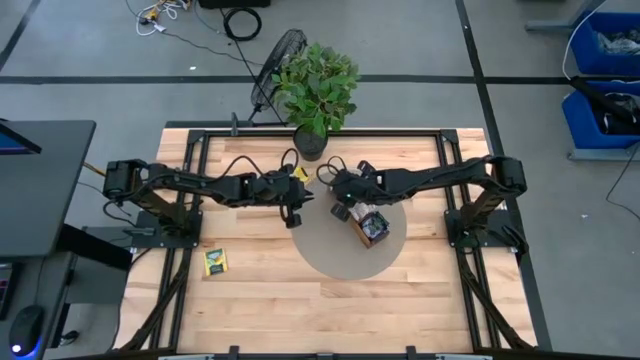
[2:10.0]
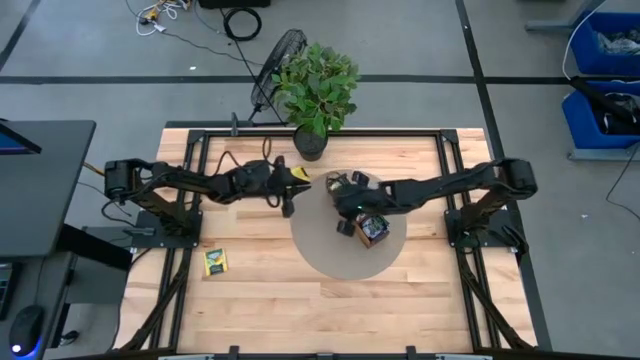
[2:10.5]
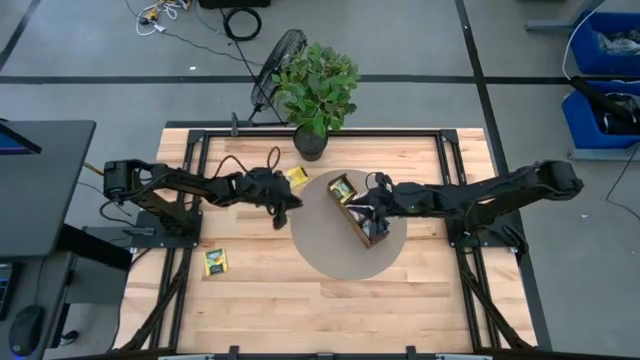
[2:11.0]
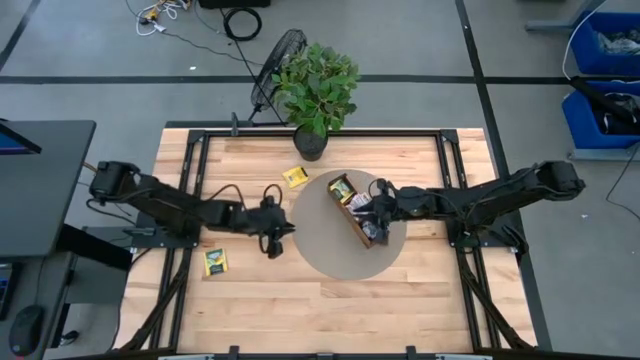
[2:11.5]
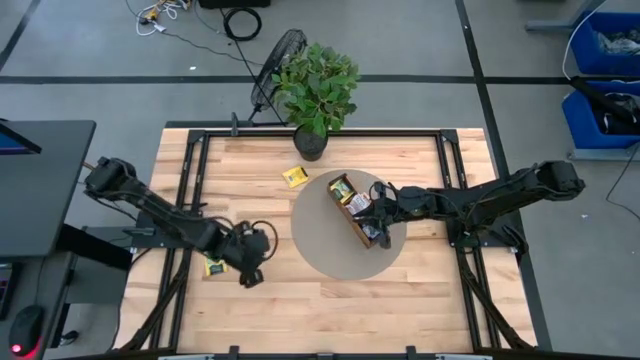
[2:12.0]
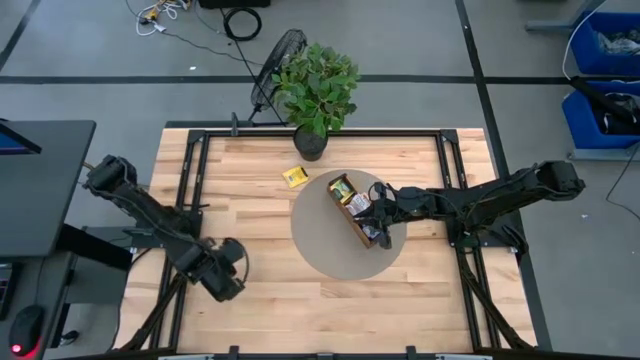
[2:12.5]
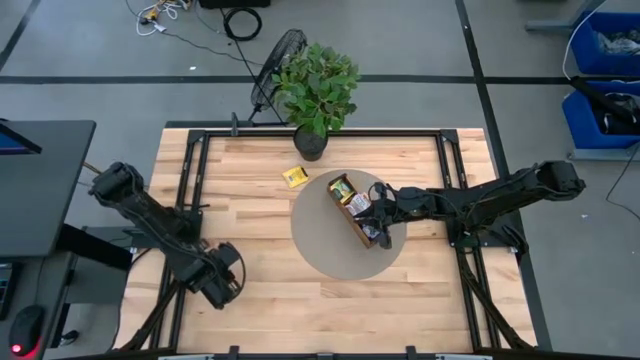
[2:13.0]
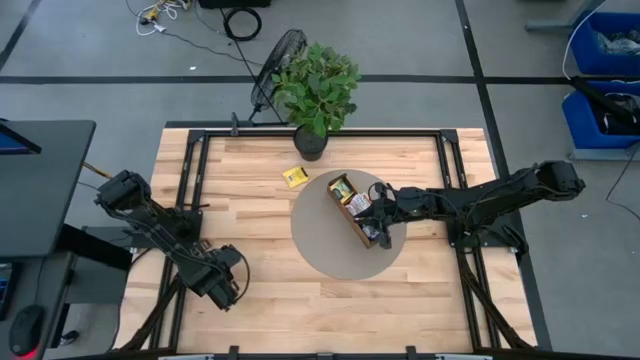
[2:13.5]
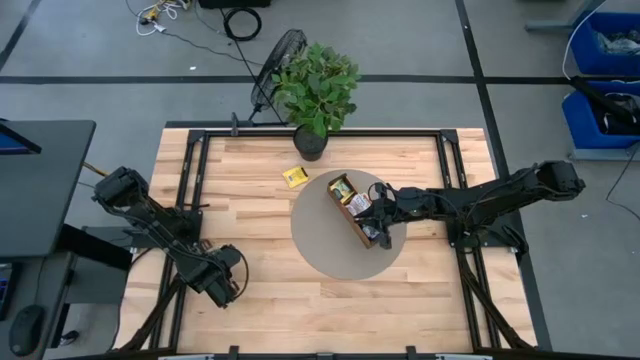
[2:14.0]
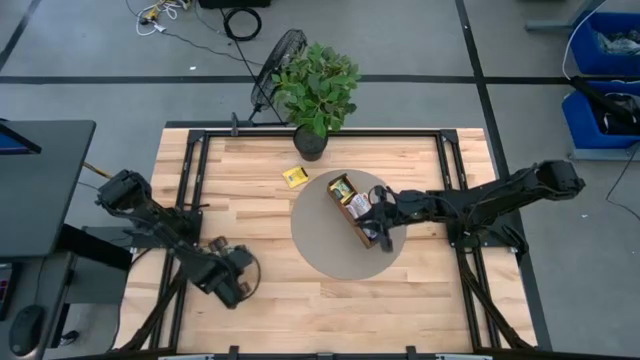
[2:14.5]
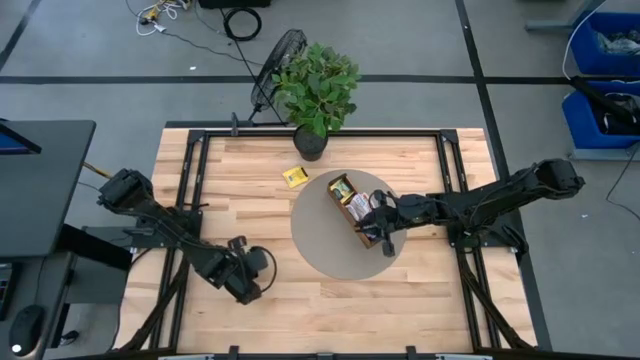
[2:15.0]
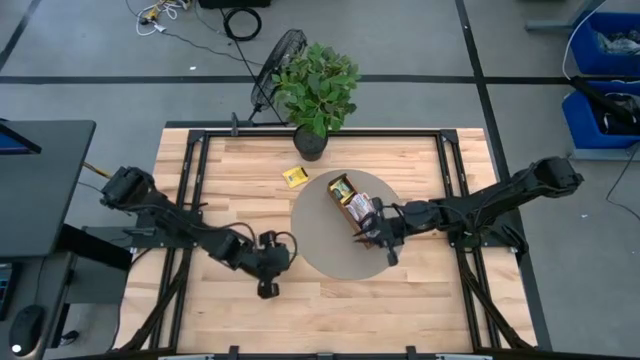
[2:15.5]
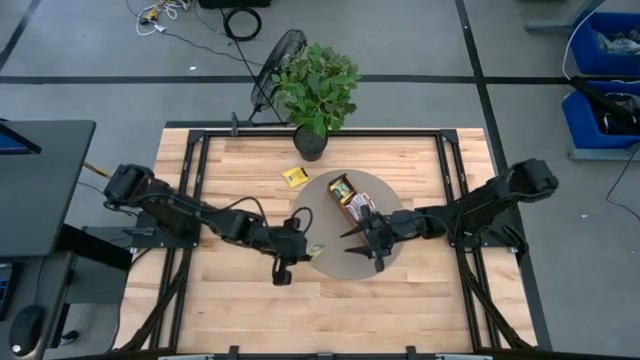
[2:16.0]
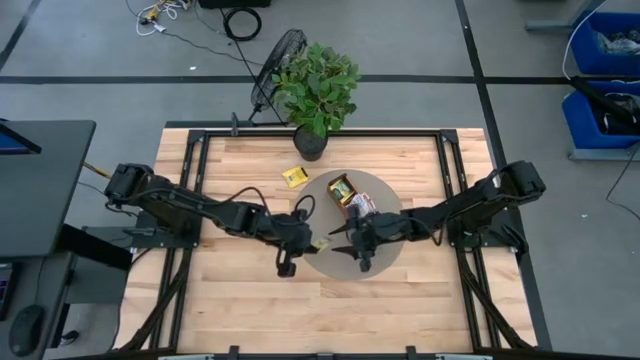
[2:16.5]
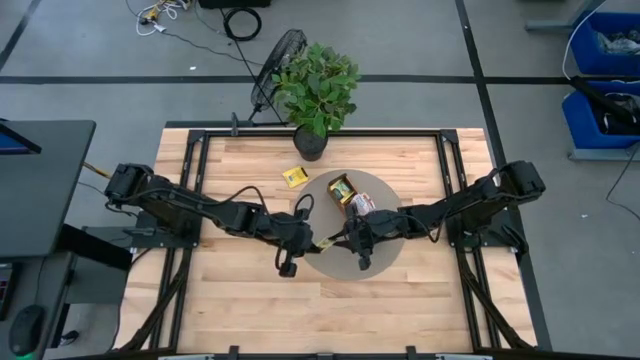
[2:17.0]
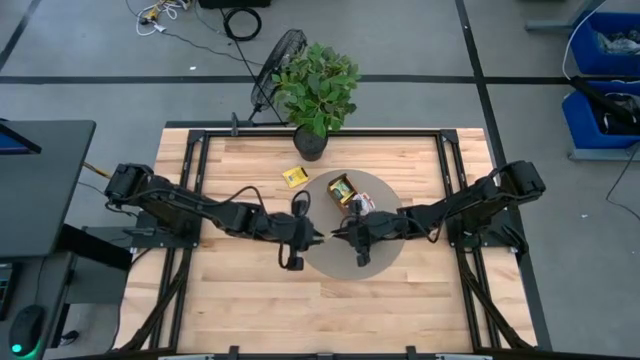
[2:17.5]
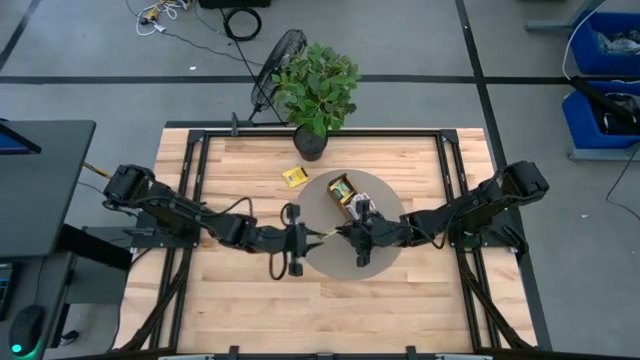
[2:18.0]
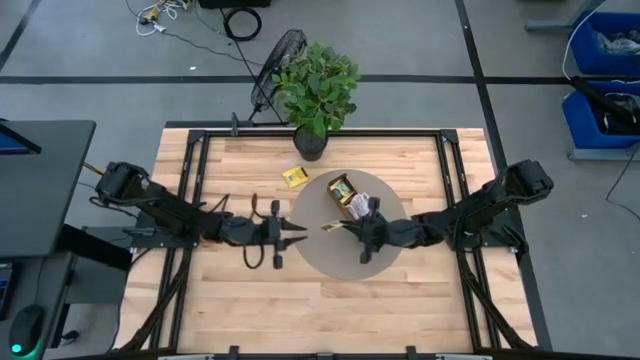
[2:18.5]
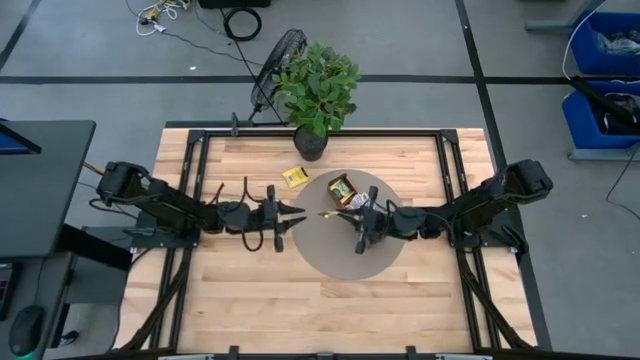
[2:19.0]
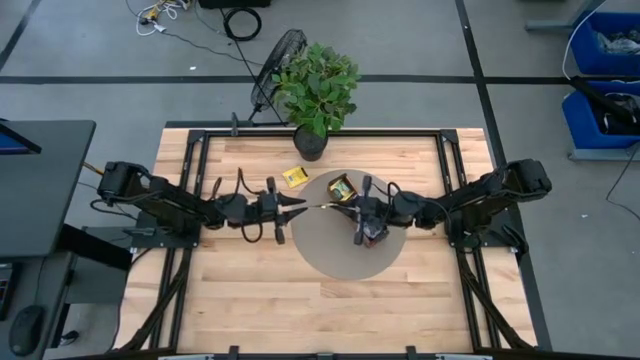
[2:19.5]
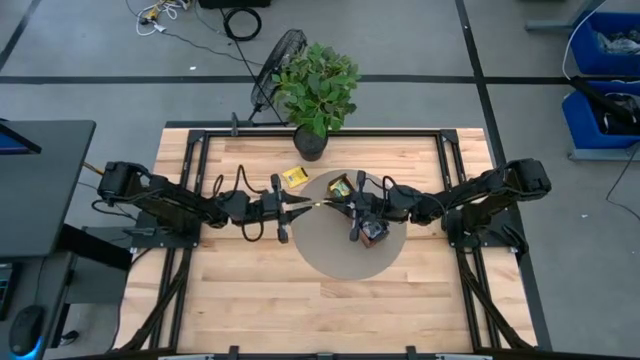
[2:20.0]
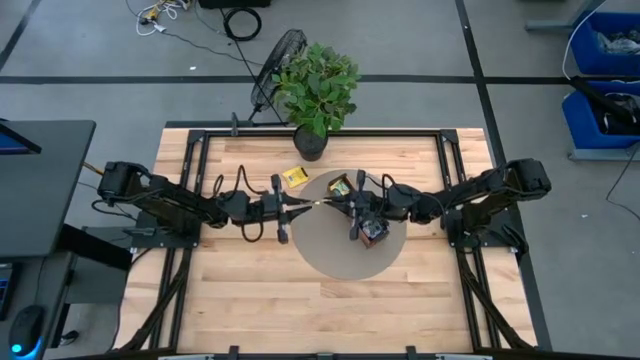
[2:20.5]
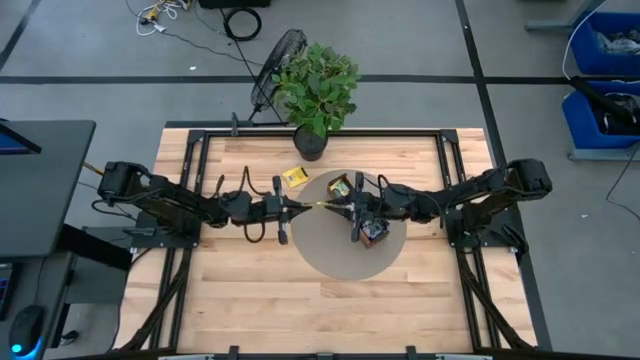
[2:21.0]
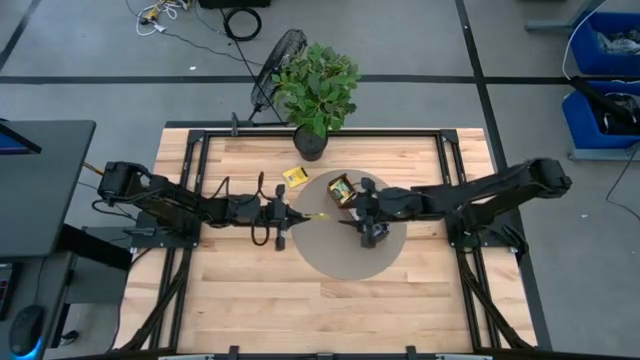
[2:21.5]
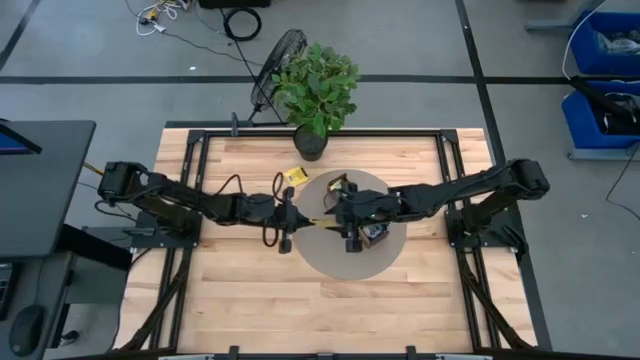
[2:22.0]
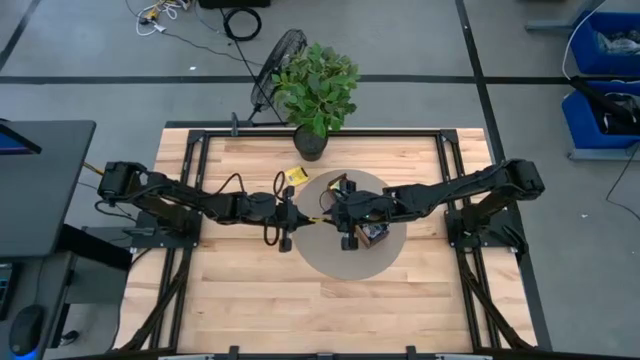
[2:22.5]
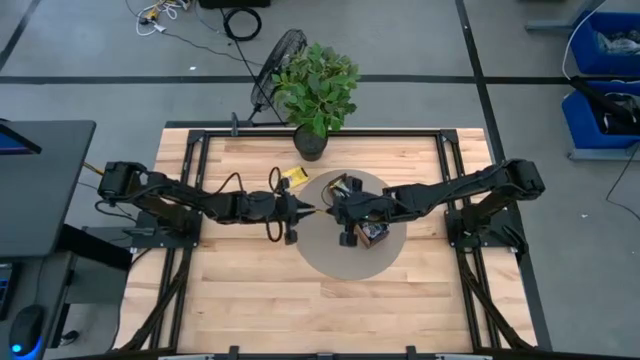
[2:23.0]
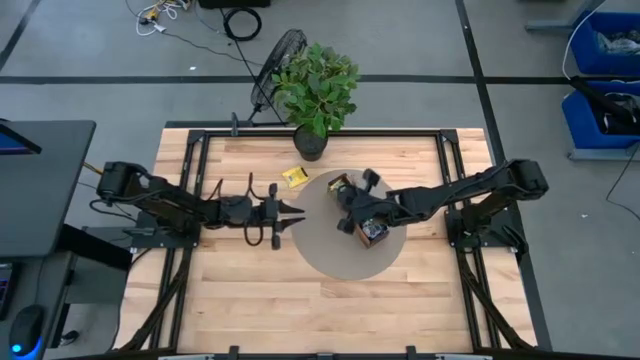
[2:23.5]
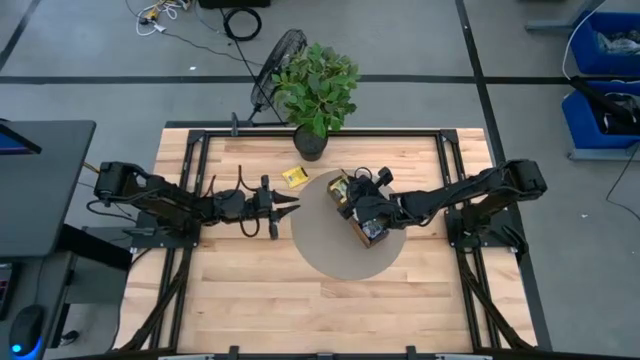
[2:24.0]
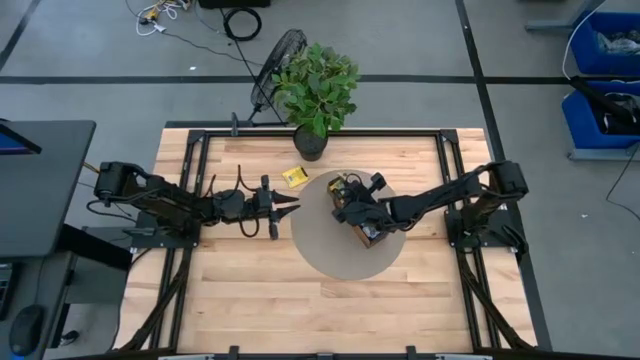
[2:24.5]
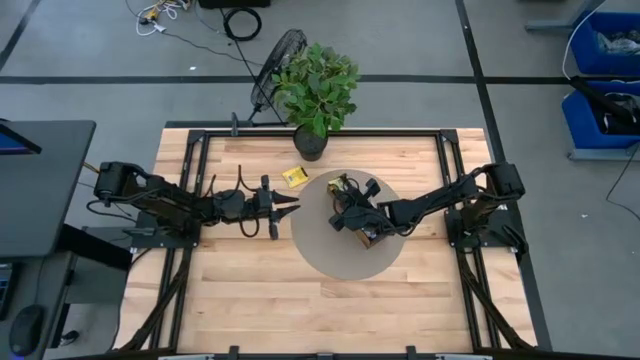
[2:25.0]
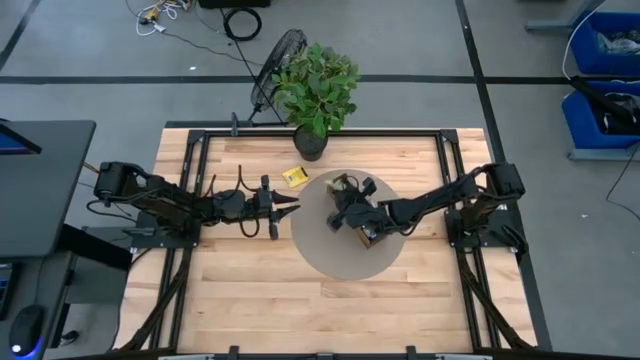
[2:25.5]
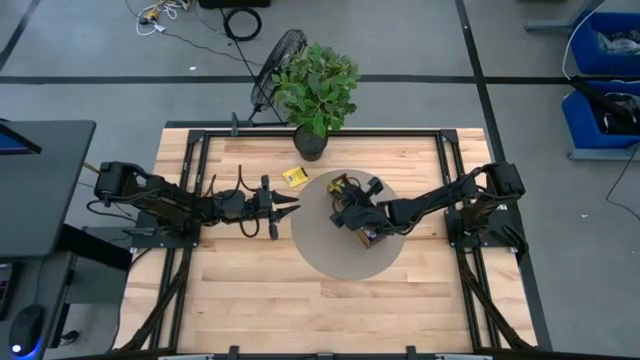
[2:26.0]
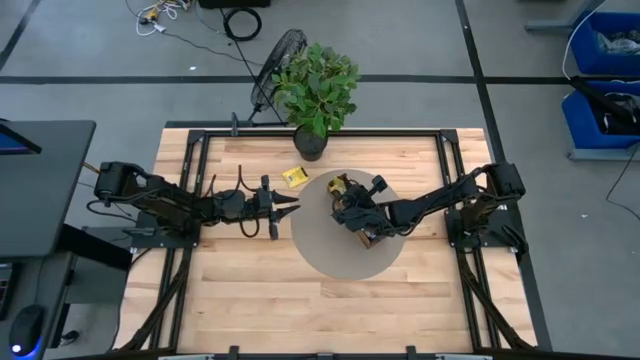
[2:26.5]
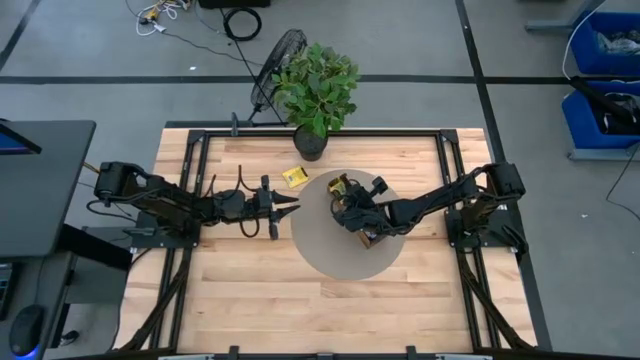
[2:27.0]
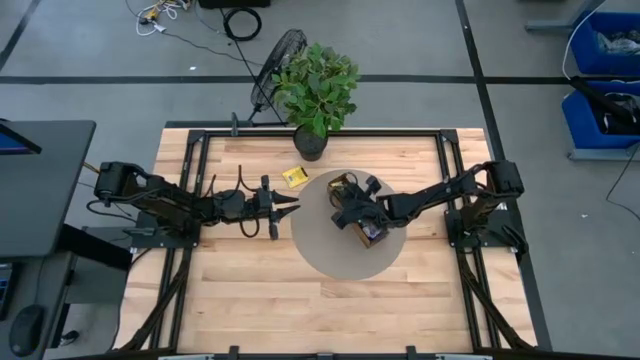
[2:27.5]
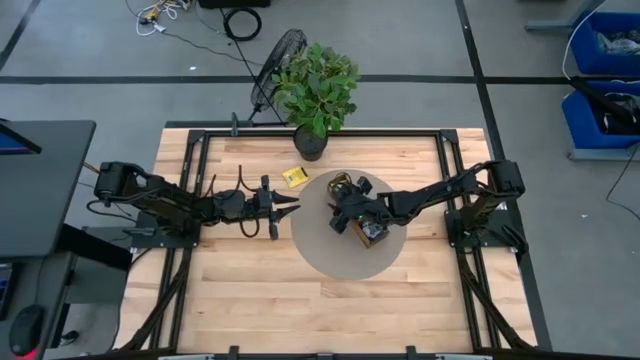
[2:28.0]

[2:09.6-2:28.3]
Task: Pick & Place Tea
Put the yellow tea bag into the left section of the wooden organizer

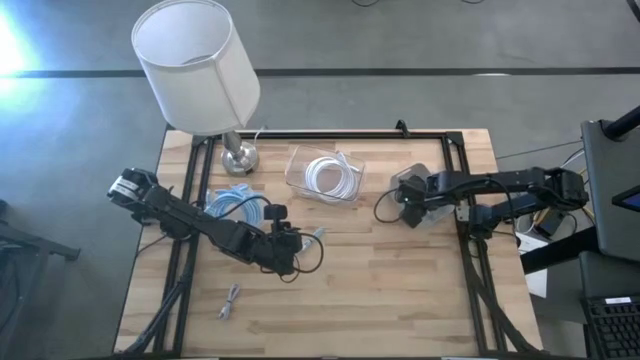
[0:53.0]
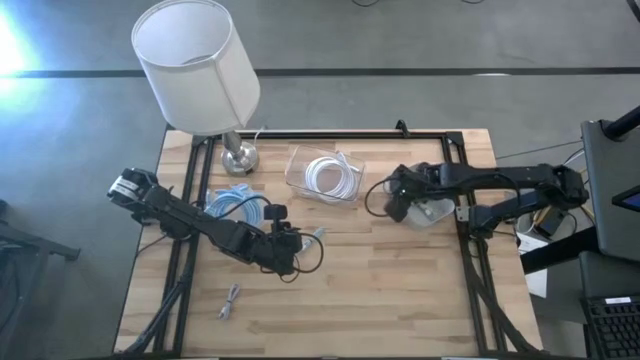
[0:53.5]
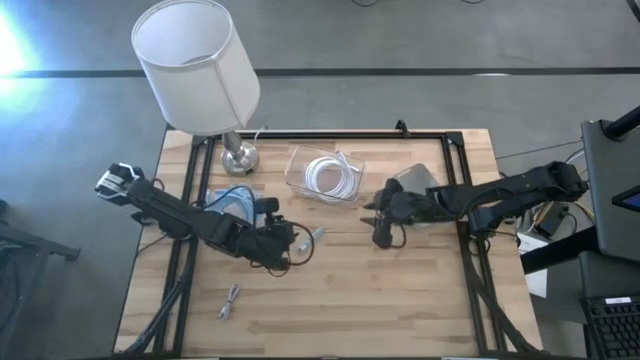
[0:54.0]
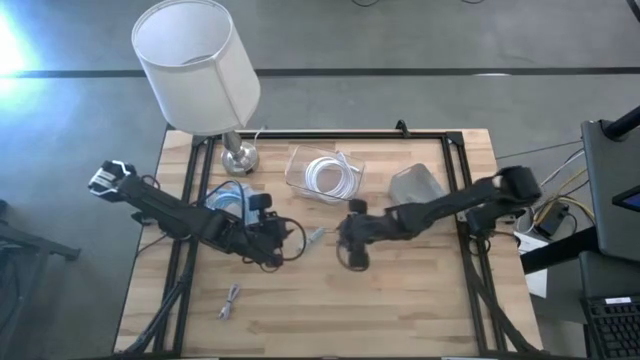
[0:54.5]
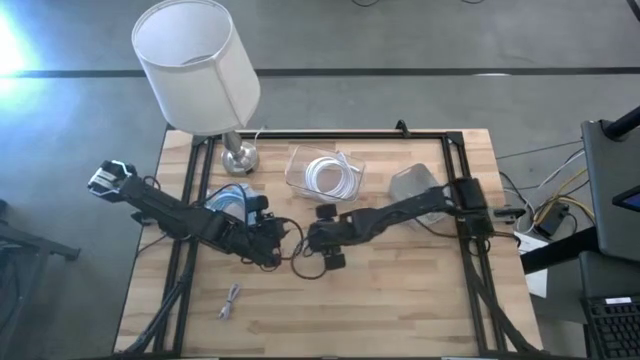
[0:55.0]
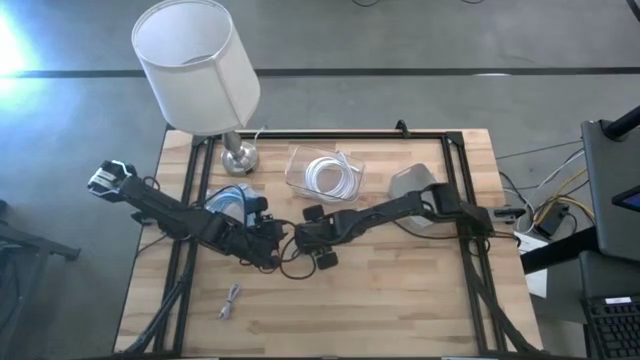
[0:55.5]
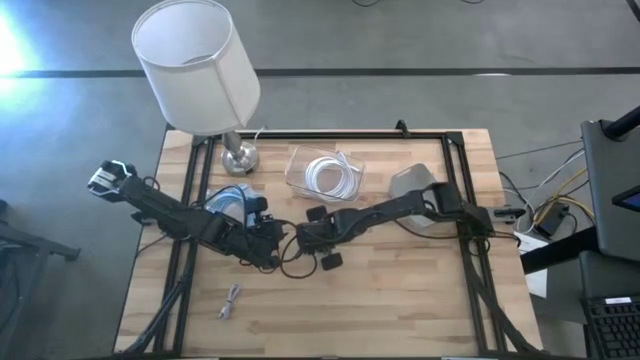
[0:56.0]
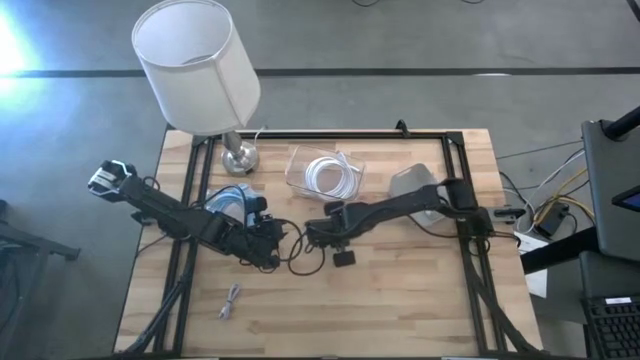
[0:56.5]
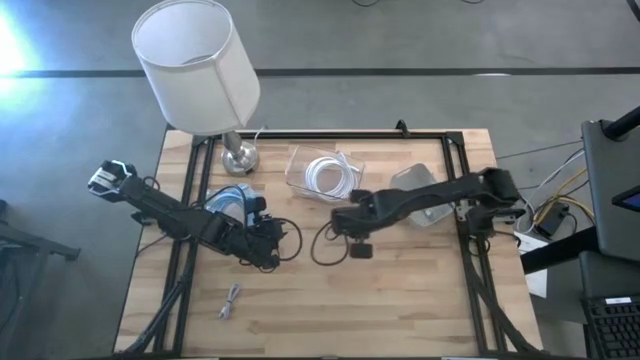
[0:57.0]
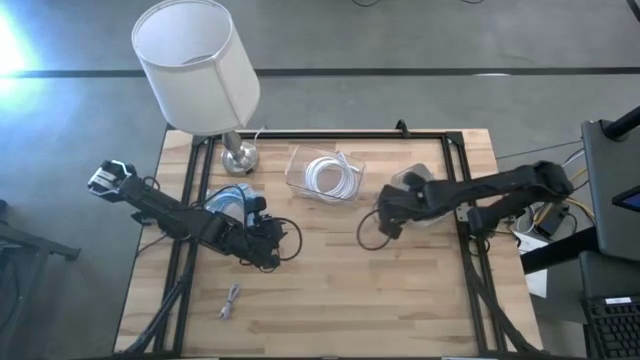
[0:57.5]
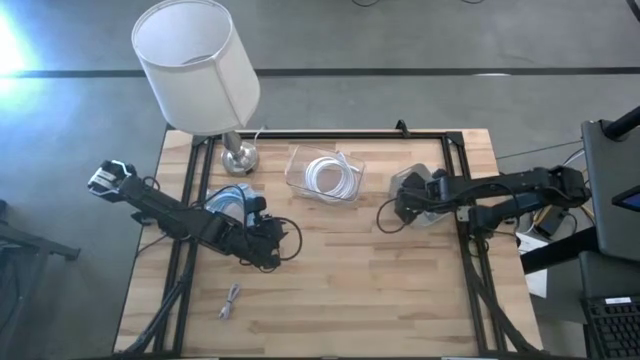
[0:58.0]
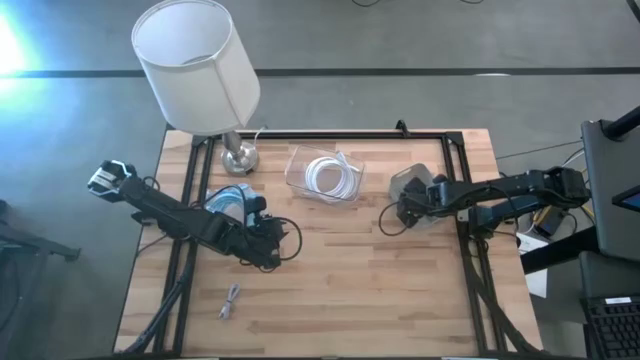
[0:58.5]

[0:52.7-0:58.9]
Task: Pick & Place USB Port
Put the light blue USB charging cable into the gray bin
